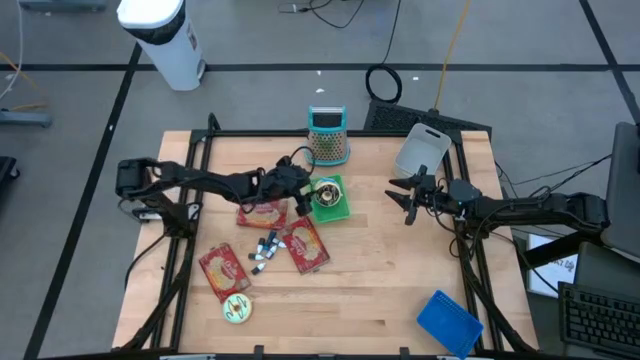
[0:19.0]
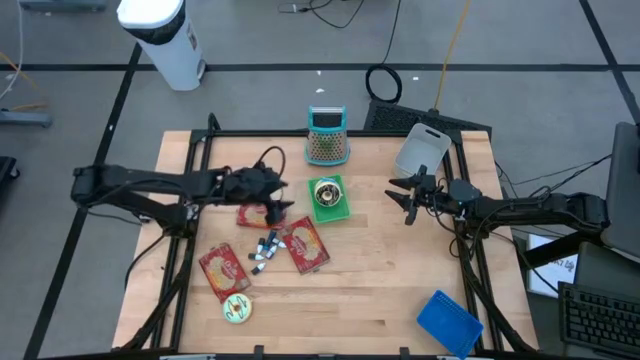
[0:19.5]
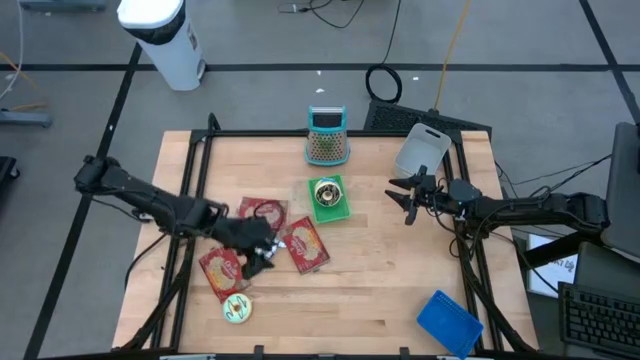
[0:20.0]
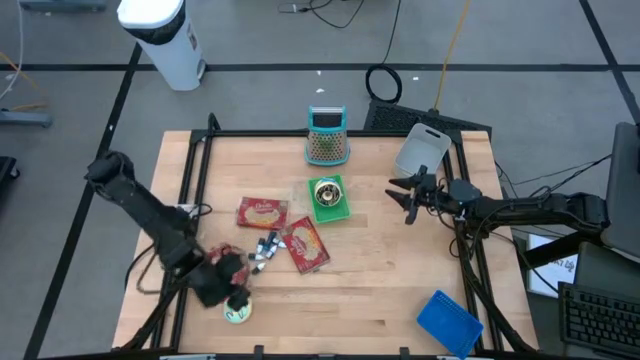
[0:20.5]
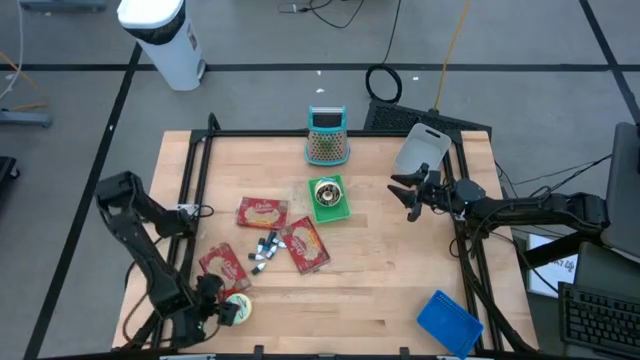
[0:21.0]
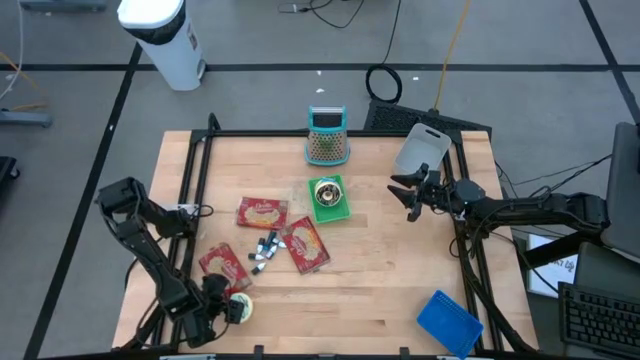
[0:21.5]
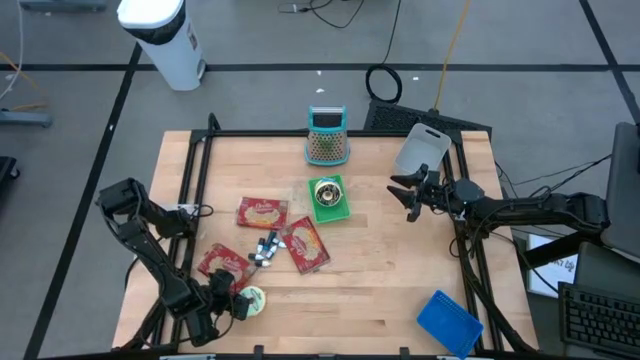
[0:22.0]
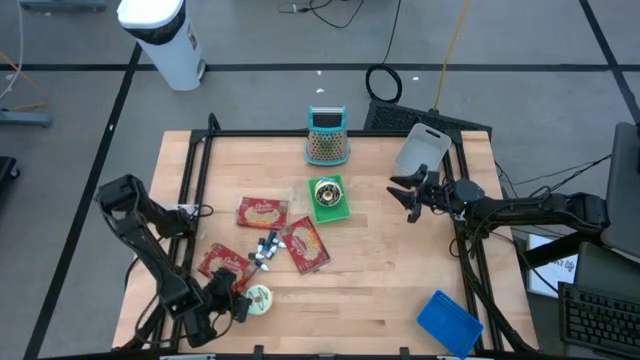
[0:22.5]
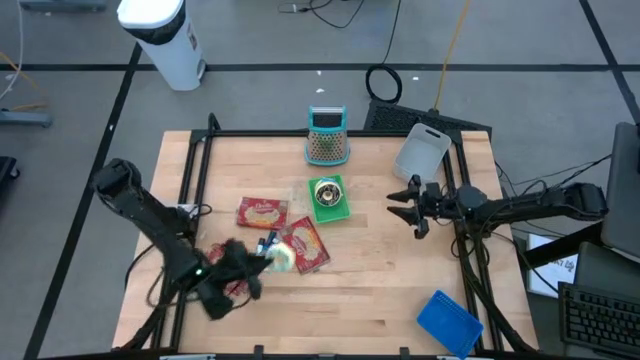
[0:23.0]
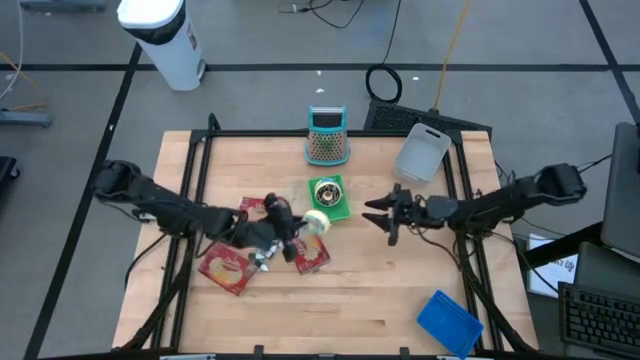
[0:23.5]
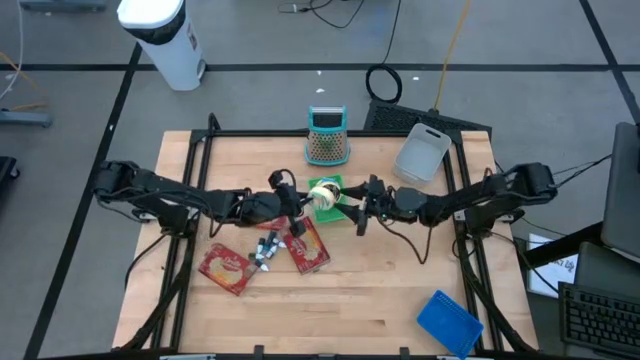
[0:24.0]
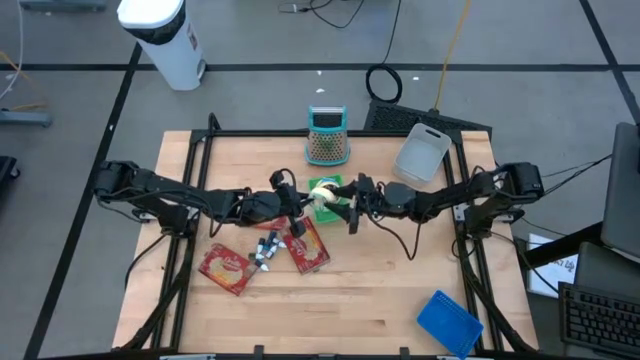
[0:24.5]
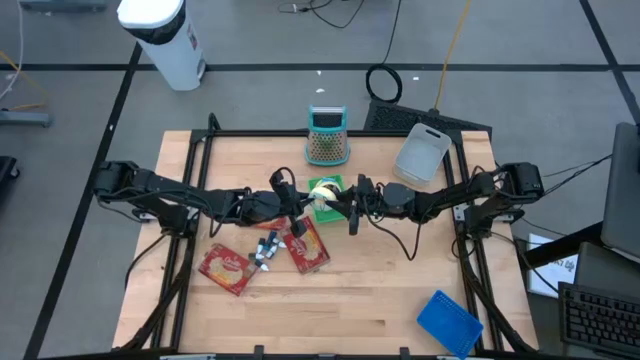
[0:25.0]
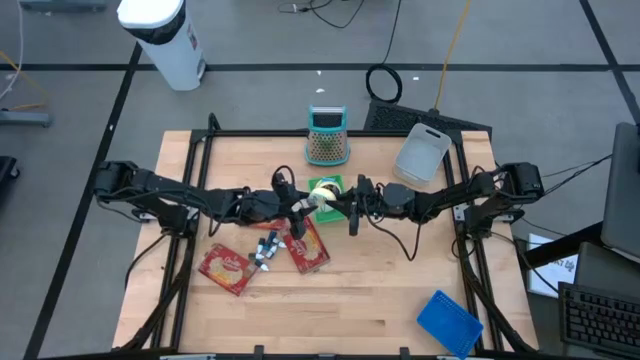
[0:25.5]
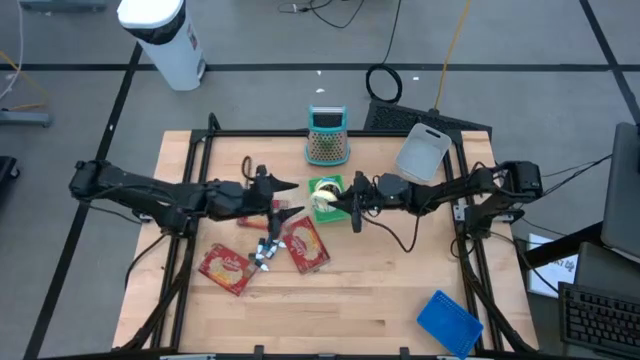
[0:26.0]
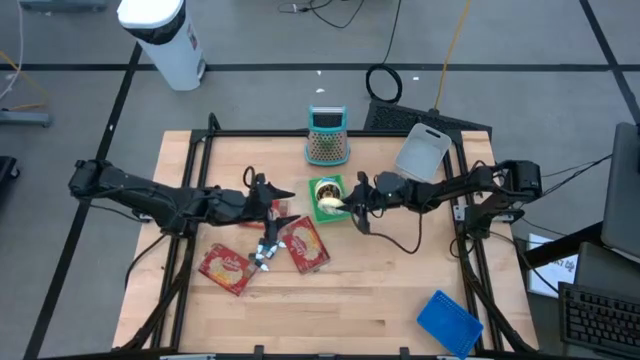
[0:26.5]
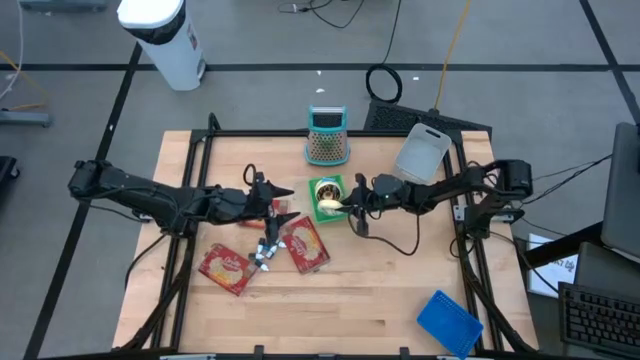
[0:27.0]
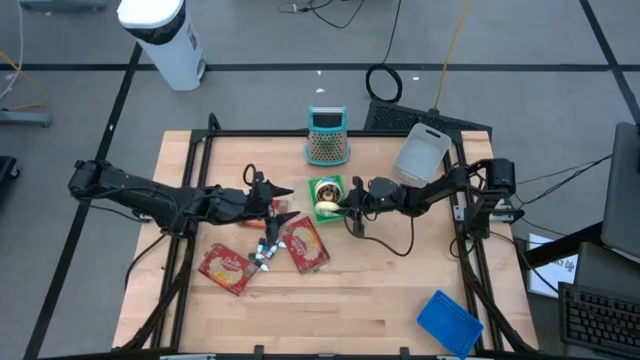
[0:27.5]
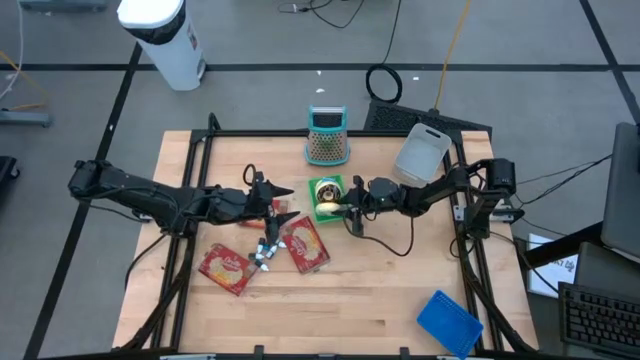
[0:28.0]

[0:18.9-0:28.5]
Put the light blue donut into the green bin

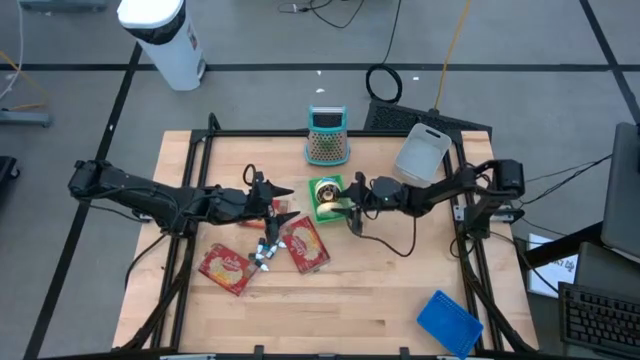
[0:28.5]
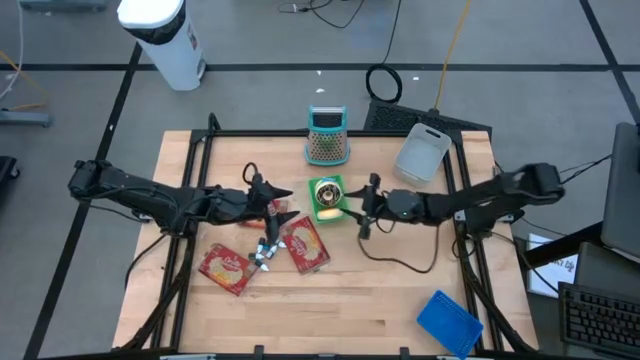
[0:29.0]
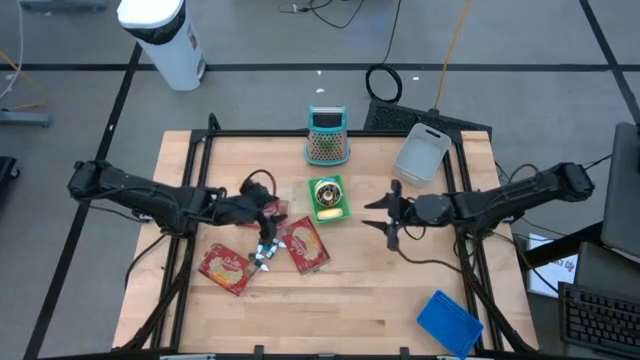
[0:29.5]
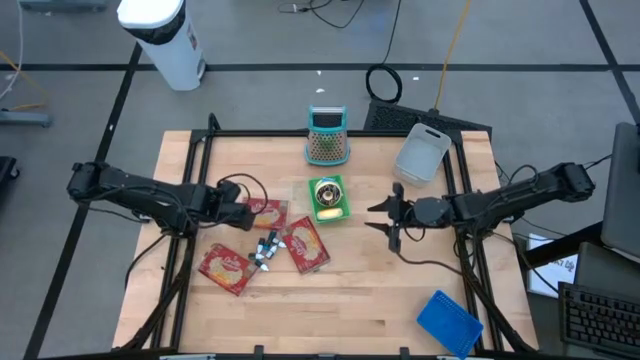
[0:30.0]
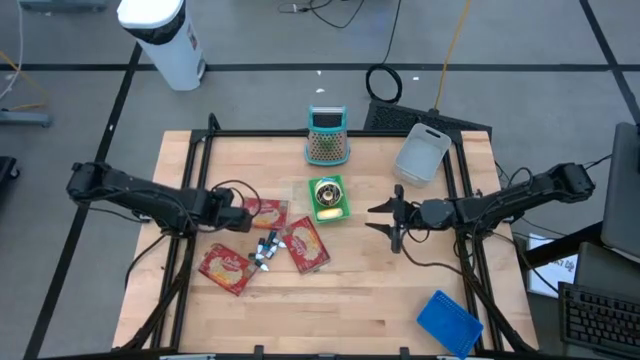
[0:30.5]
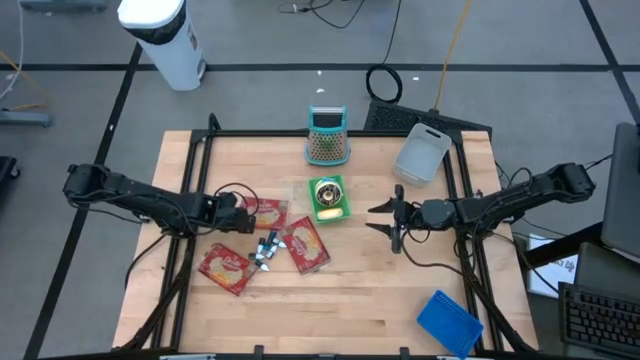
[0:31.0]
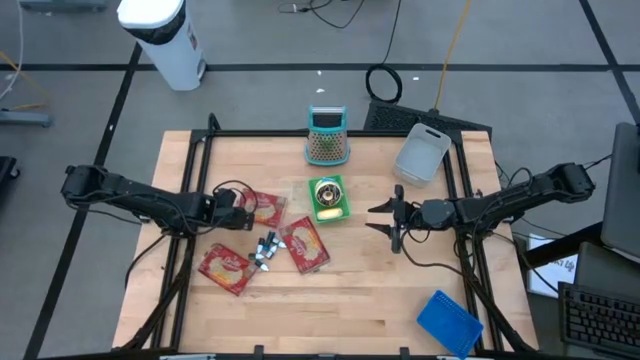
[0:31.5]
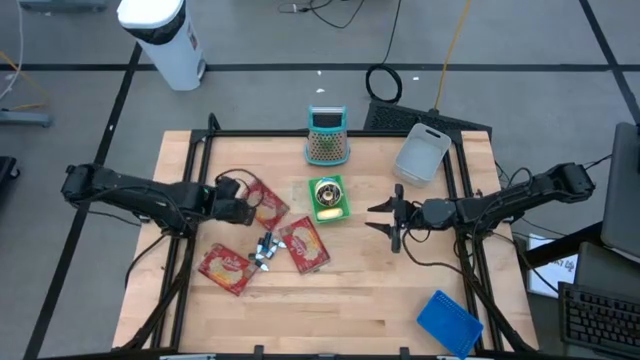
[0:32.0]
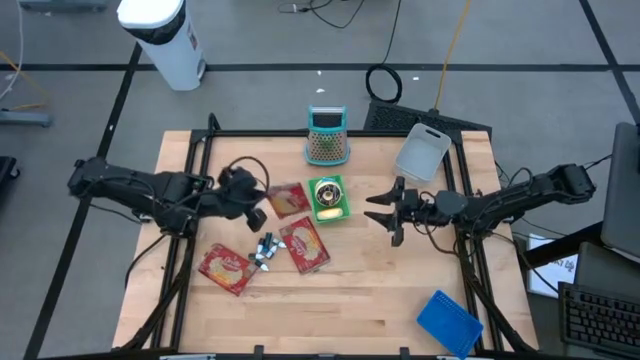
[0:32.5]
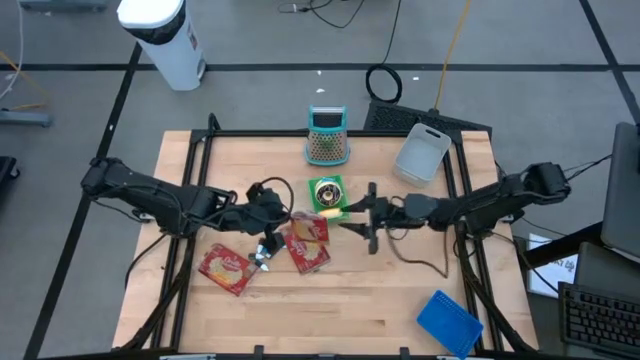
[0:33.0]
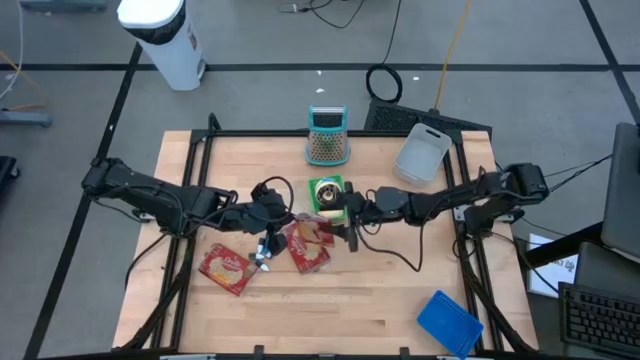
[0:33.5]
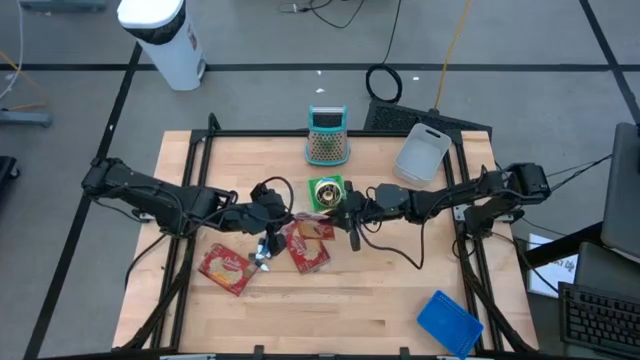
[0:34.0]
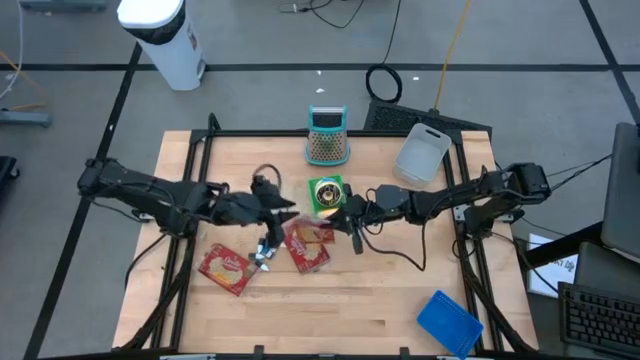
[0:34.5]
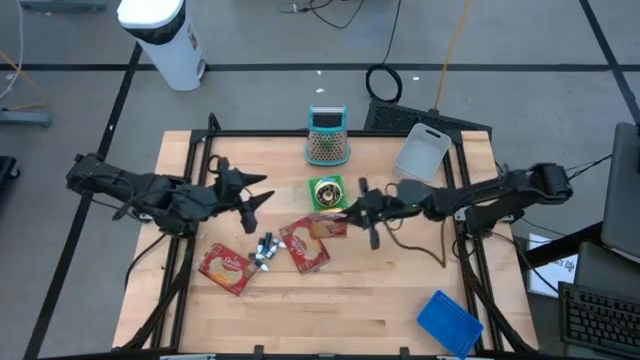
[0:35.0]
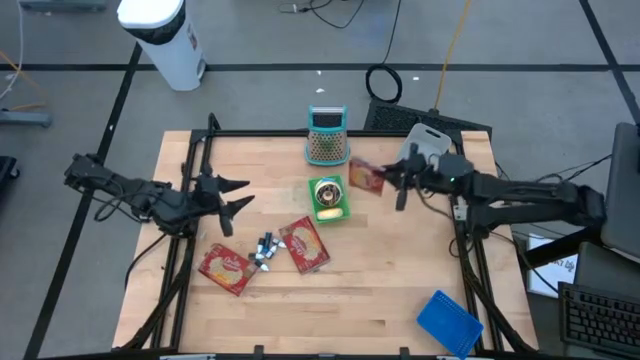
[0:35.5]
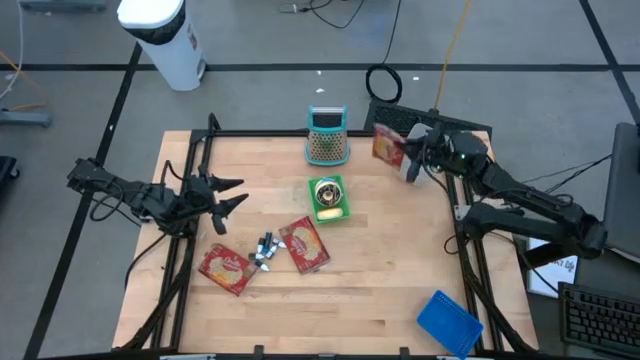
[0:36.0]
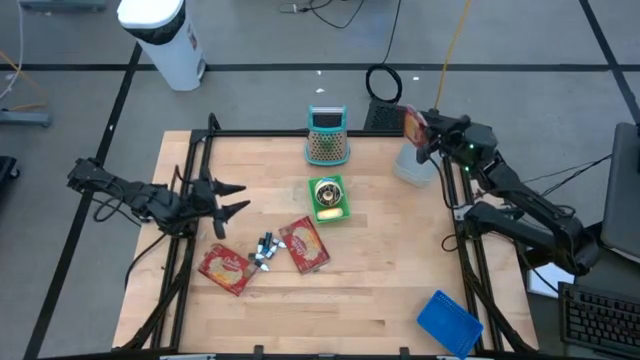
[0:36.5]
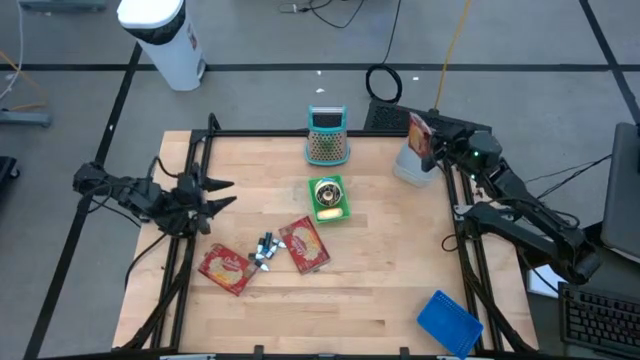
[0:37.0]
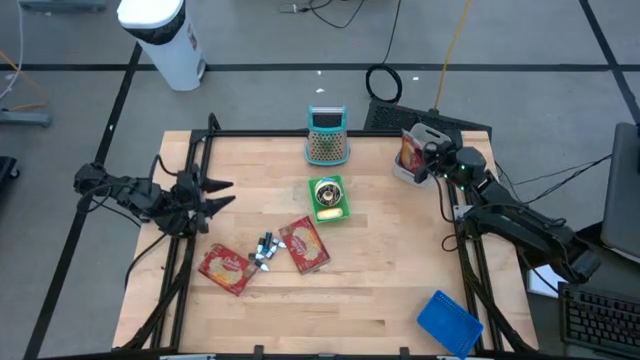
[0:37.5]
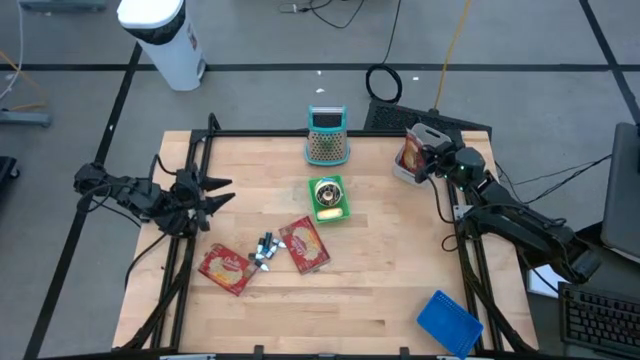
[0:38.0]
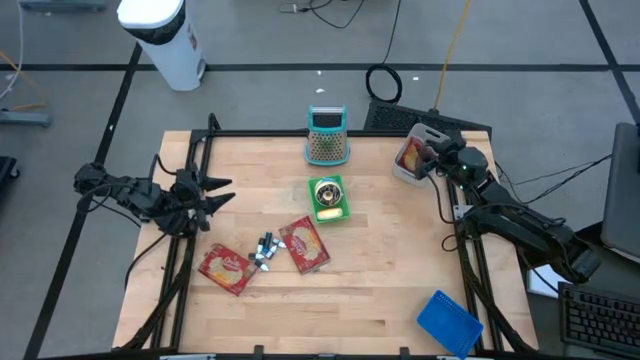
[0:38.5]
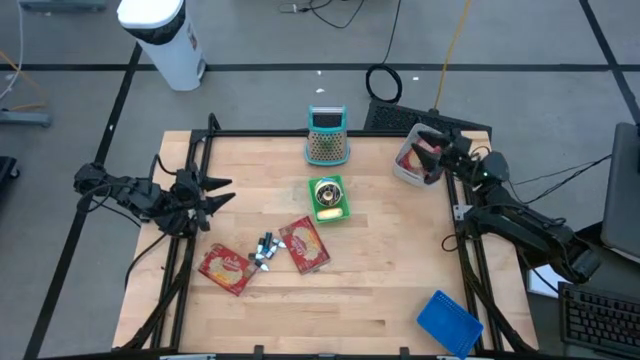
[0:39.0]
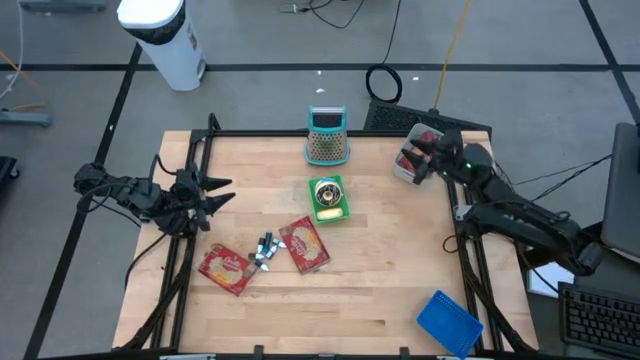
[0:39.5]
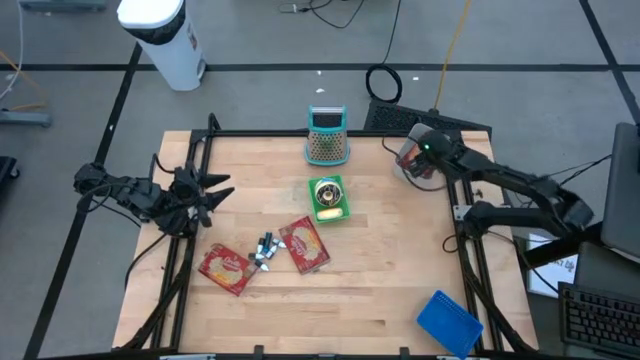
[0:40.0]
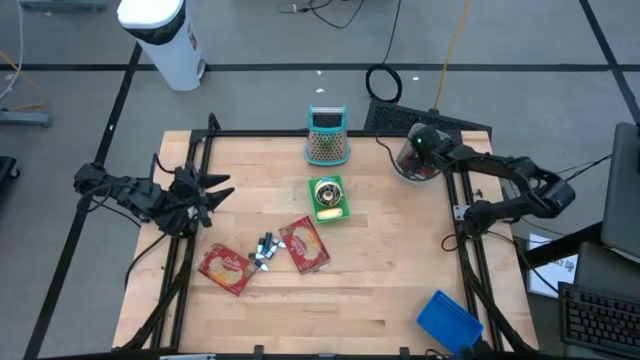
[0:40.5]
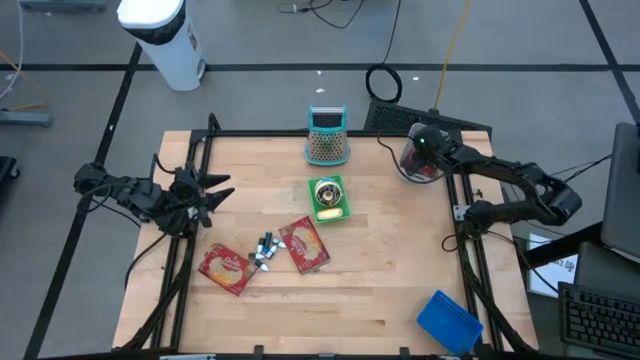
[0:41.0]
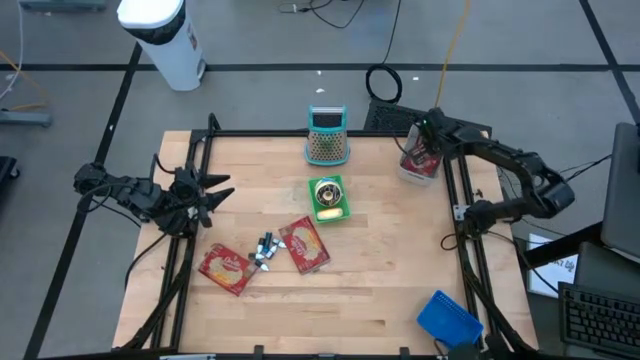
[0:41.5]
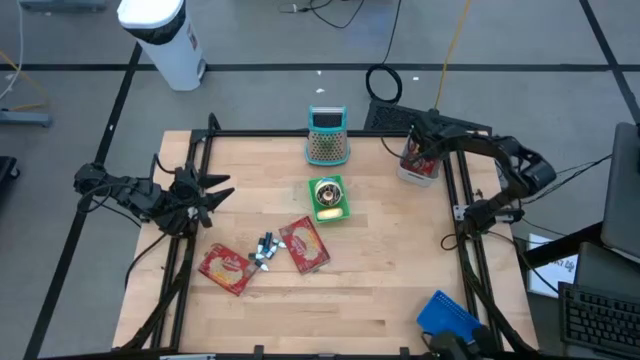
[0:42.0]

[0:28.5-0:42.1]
Put the top red popcorn bag into the gray bin
